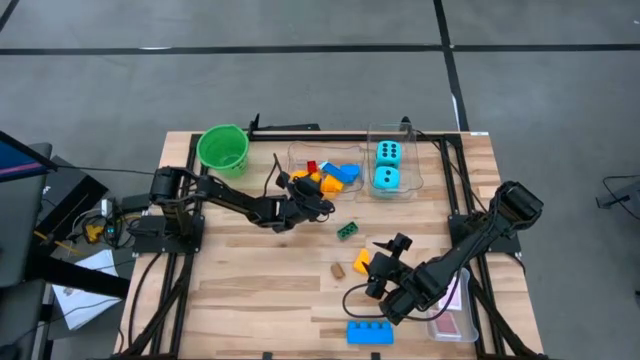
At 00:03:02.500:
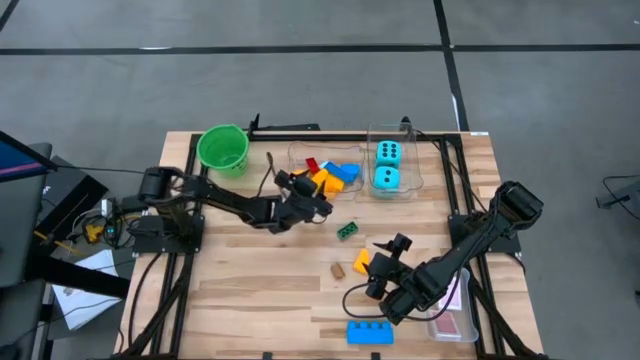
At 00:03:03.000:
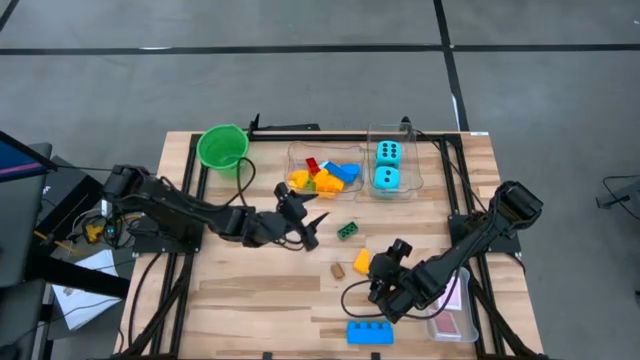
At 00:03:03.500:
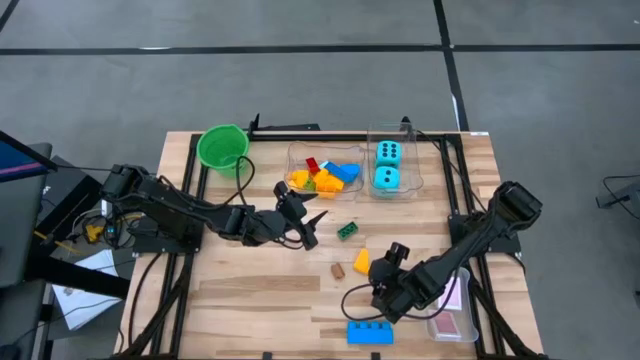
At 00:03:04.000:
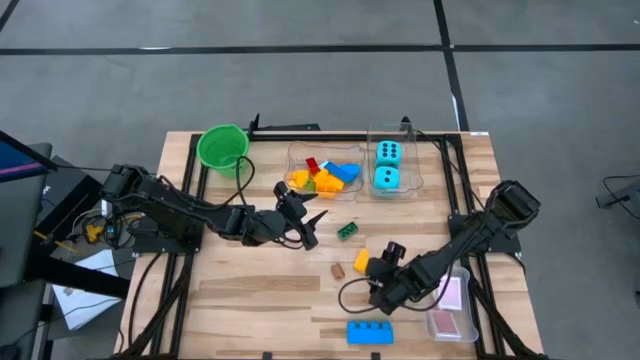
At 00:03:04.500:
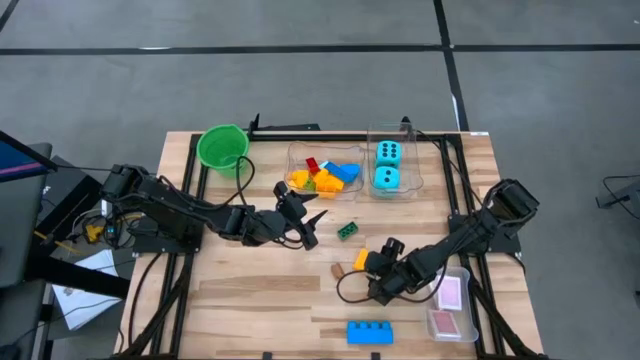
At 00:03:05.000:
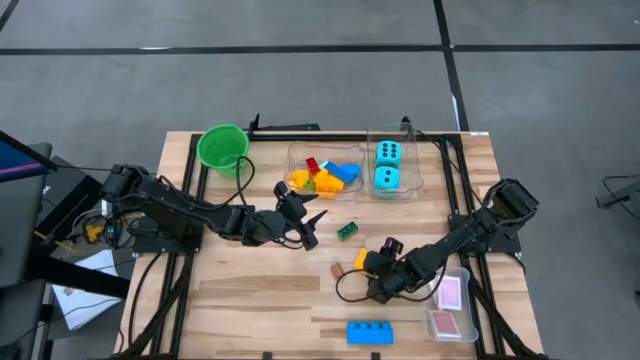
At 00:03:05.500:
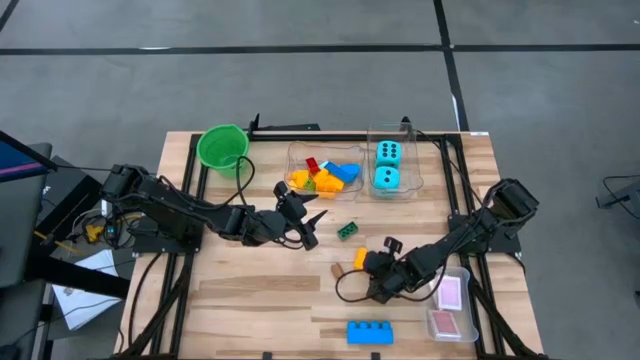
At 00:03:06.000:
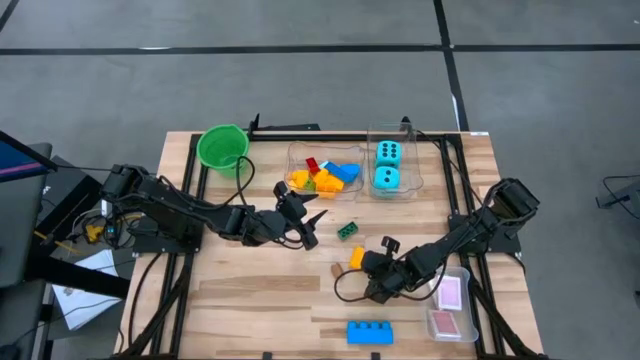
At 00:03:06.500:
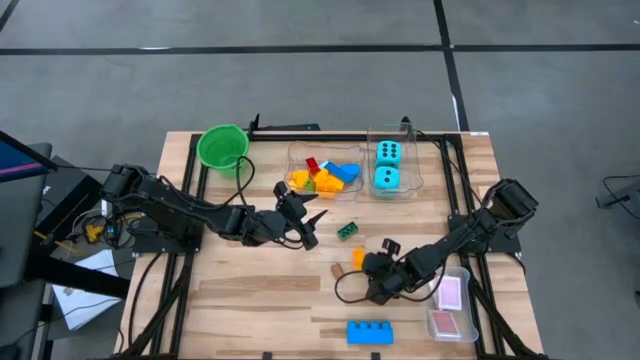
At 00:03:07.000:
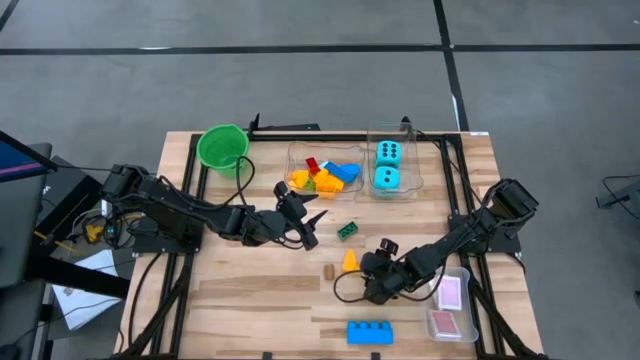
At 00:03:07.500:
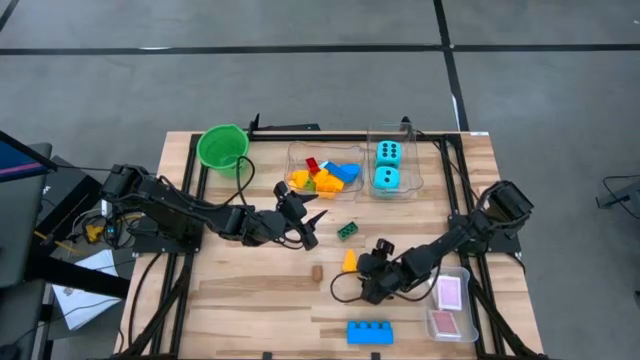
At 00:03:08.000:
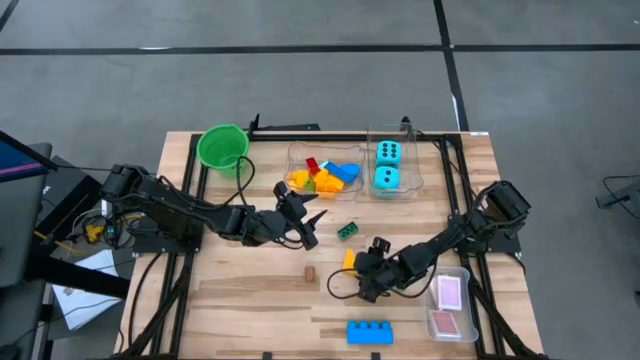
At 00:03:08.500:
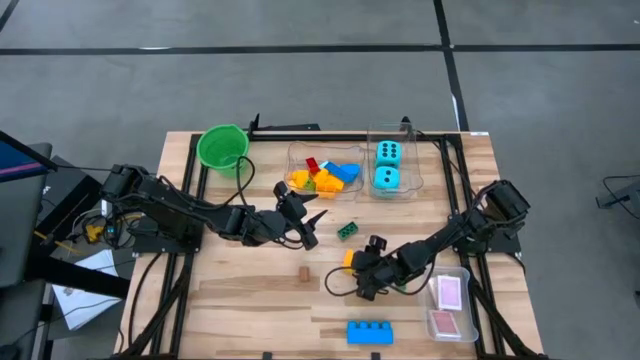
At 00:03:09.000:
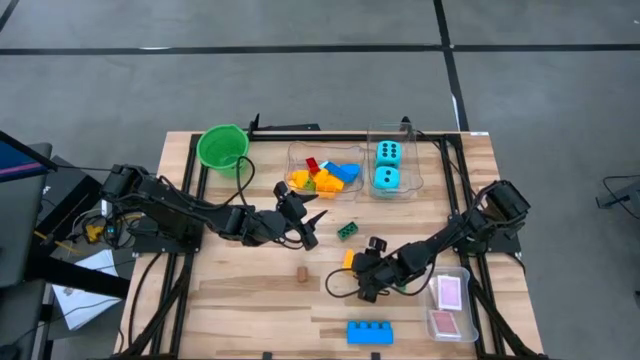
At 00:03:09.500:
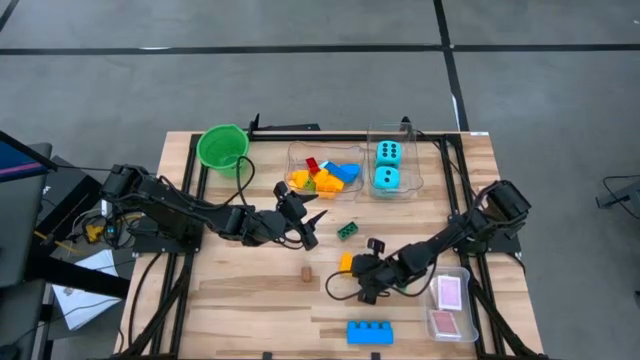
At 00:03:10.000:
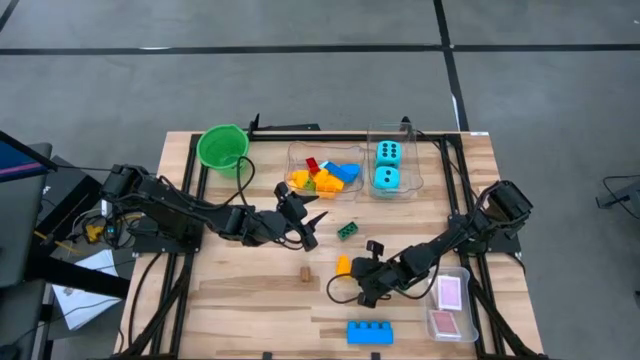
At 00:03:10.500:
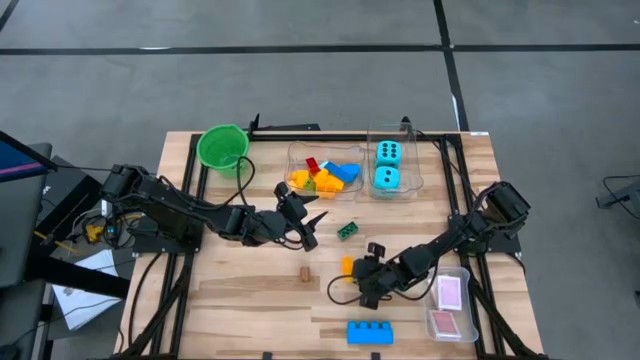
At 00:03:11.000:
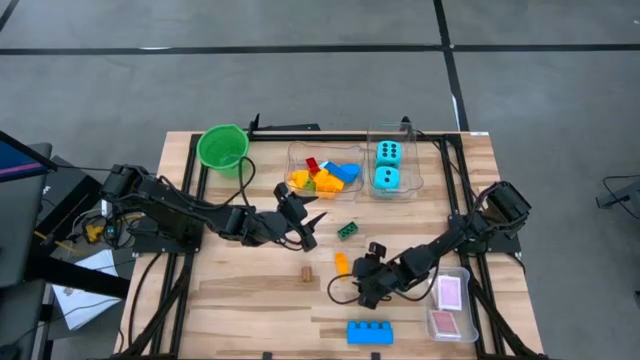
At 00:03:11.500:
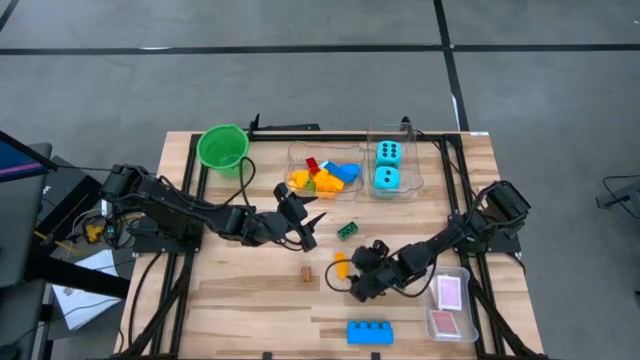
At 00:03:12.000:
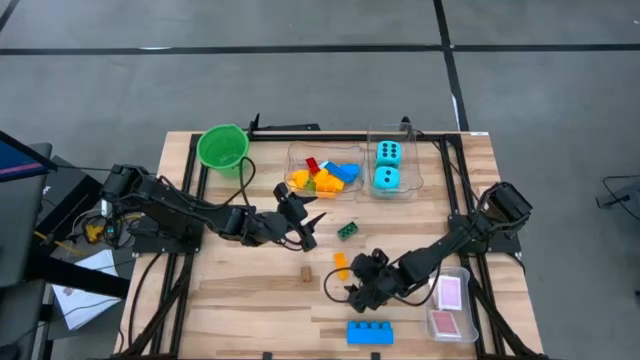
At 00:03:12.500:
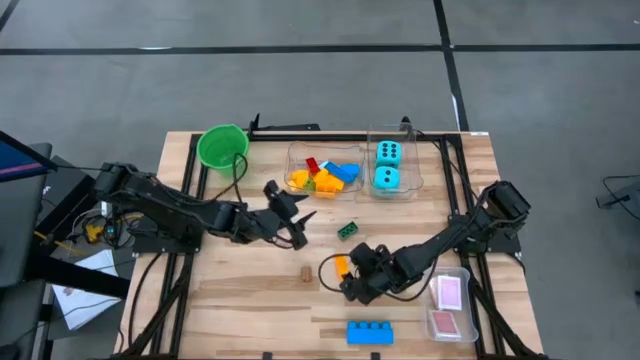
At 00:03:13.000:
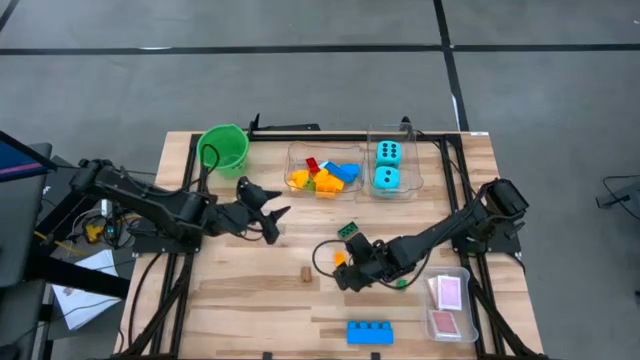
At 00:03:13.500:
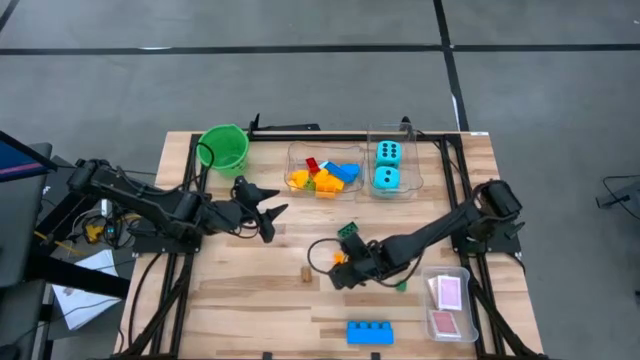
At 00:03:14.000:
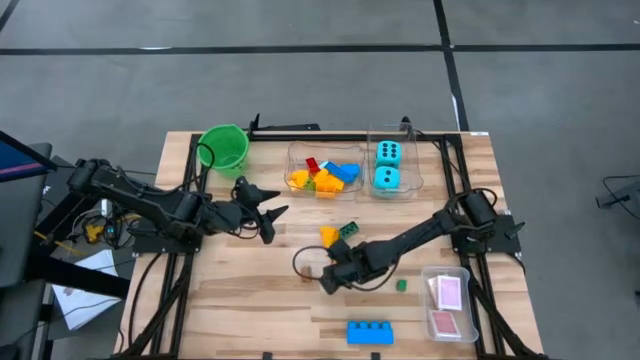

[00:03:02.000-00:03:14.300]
Task: Pick & Place Toys
Put the yellow gamepiece into the left transparent bin

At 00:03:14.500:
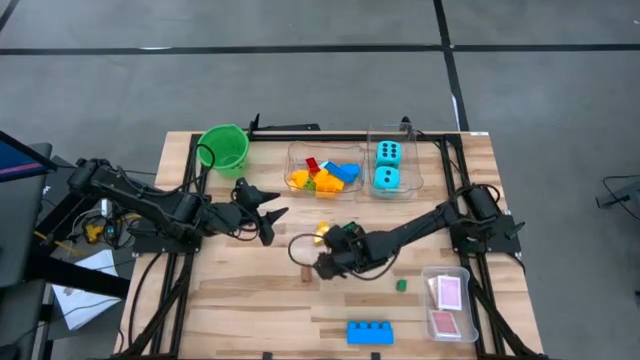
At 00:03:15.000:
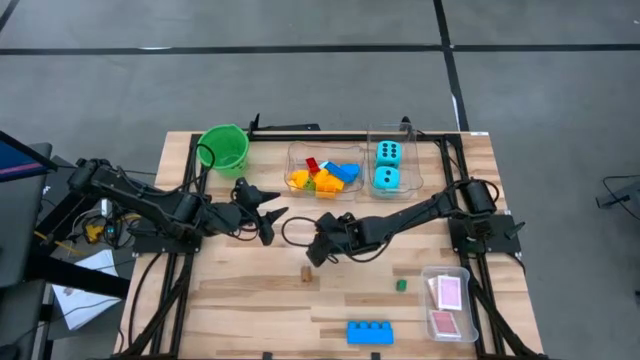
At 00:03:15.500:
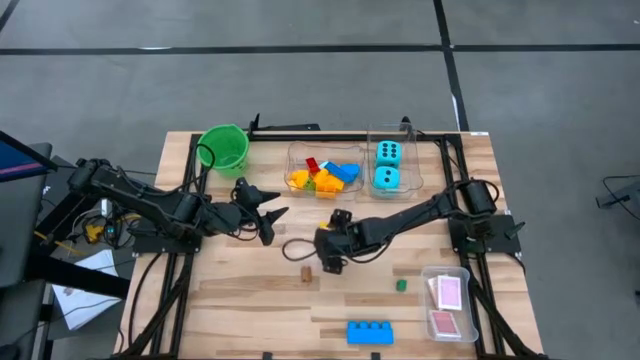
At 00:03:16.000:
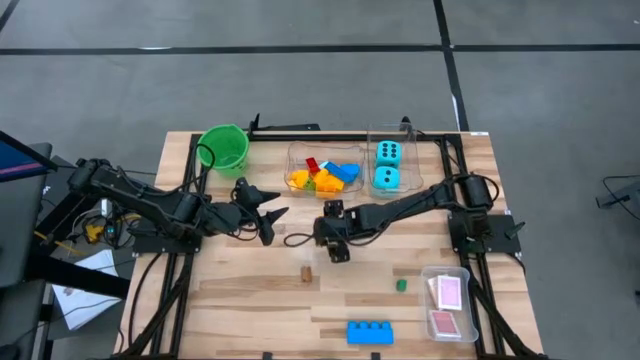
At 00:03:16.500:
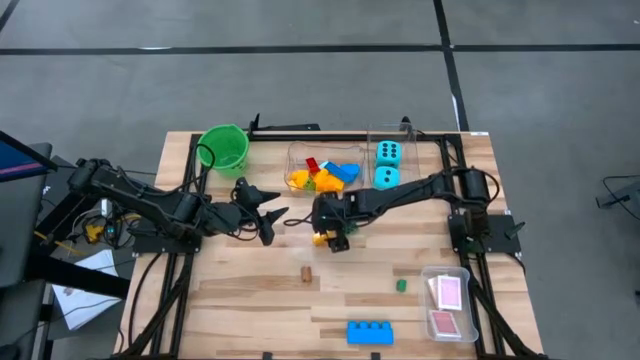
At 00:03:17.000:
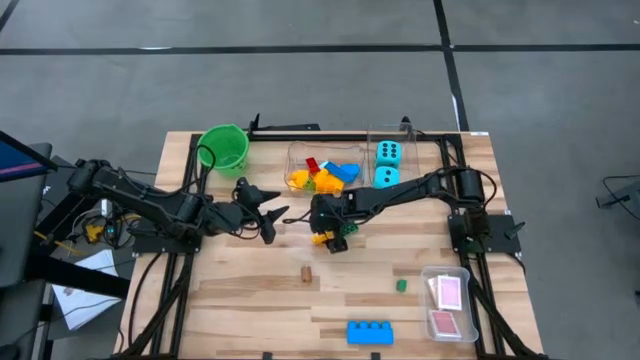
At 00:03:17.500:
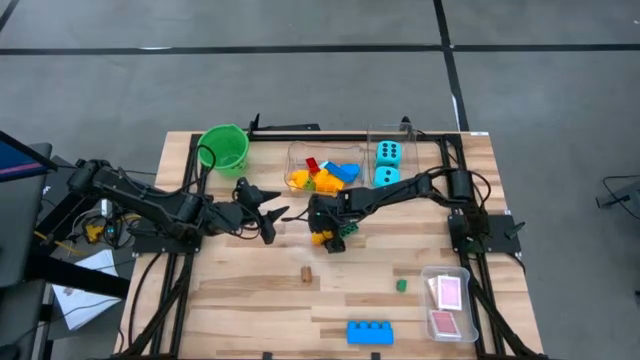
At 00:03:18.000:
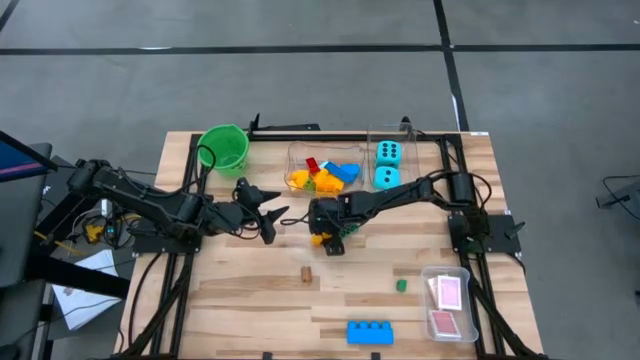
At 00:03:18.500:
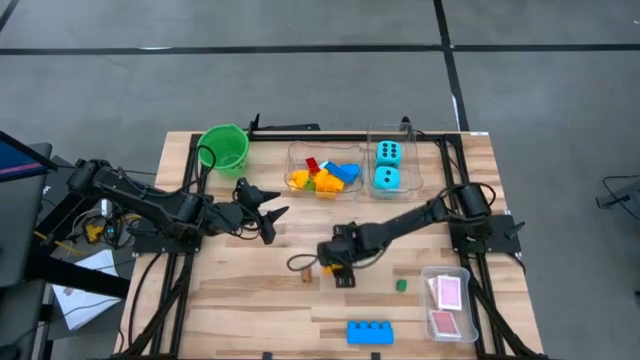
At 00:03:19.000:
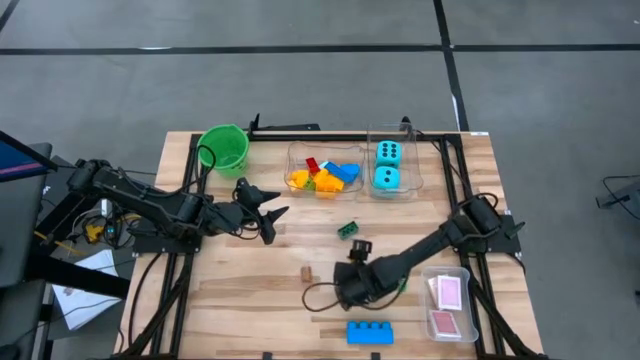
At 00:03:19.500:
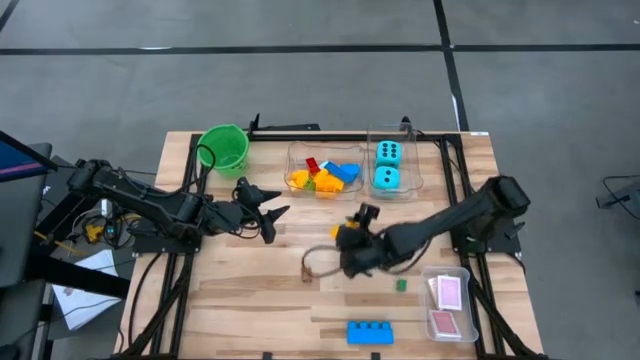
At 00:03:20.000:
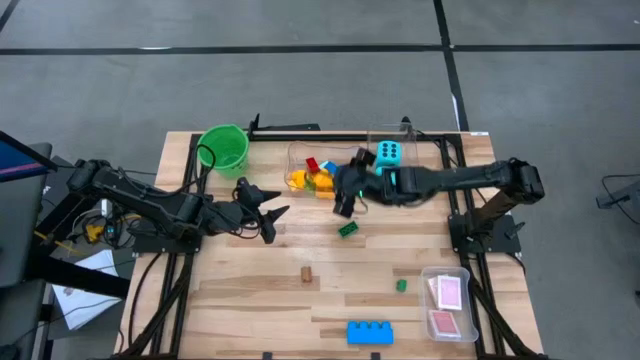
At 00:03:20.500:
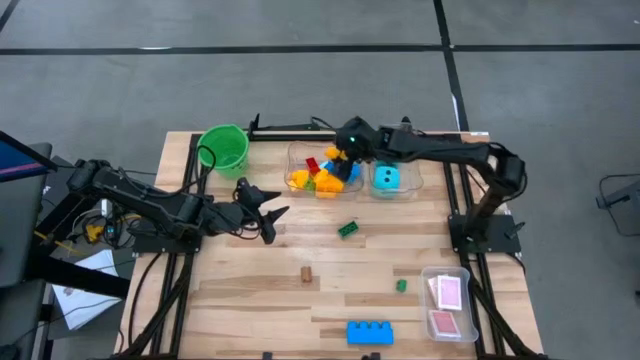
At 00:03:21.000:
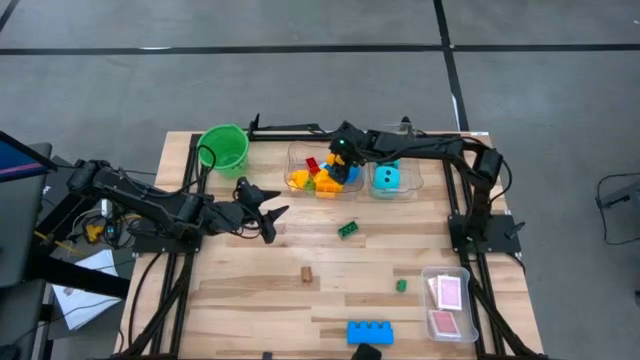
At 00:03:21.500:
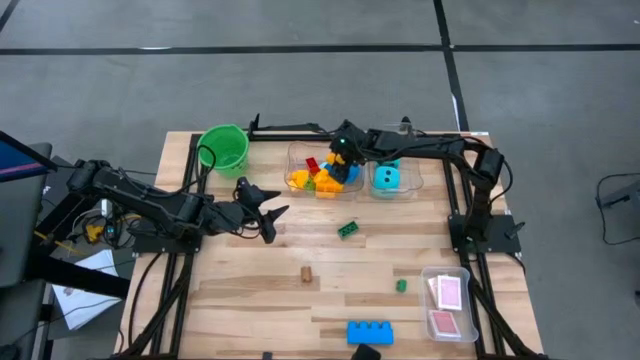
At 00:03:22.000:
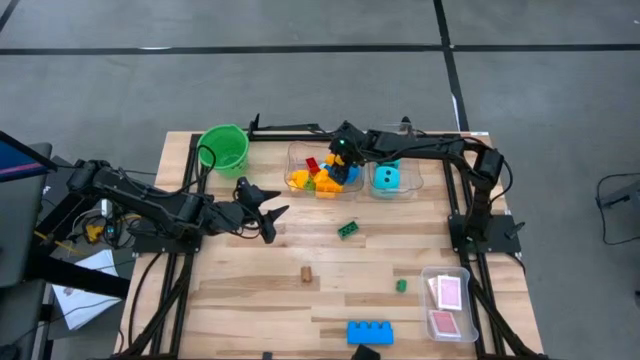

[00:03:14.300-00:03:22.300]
Put the yellow gamepiece into the left transparent bin
